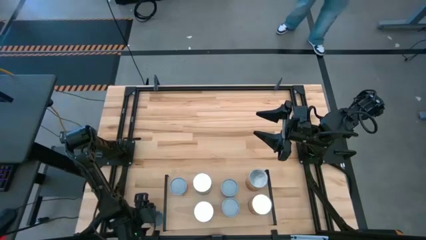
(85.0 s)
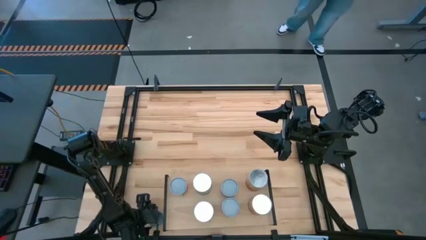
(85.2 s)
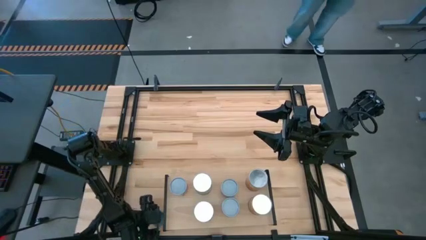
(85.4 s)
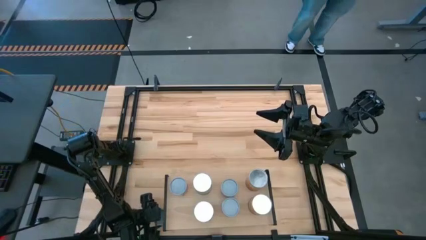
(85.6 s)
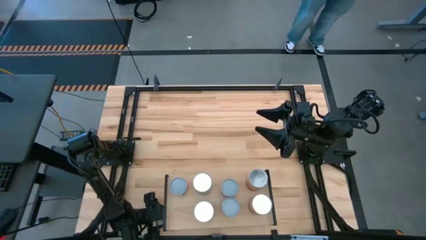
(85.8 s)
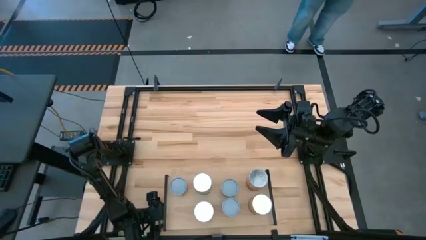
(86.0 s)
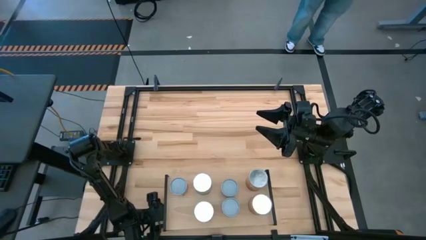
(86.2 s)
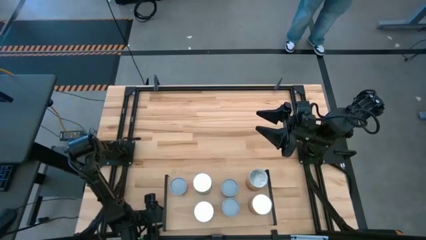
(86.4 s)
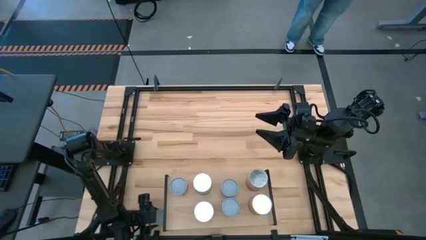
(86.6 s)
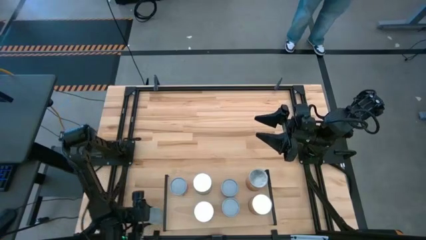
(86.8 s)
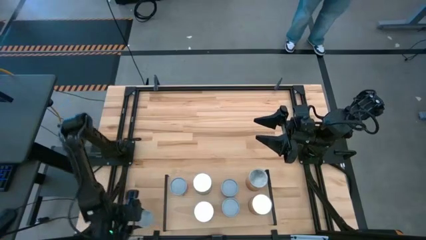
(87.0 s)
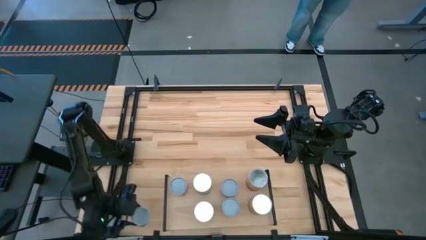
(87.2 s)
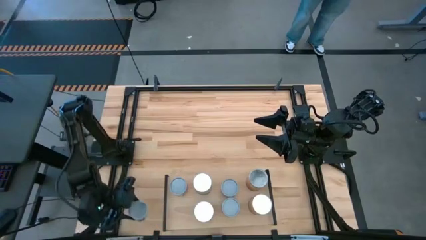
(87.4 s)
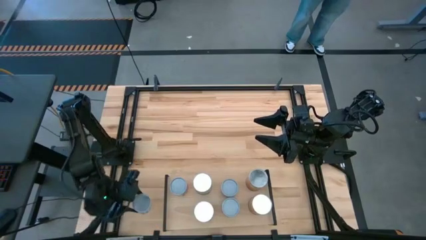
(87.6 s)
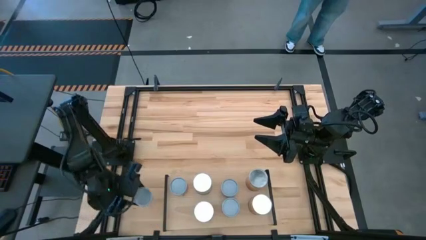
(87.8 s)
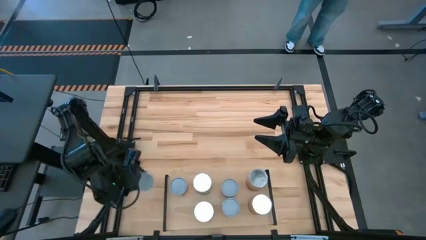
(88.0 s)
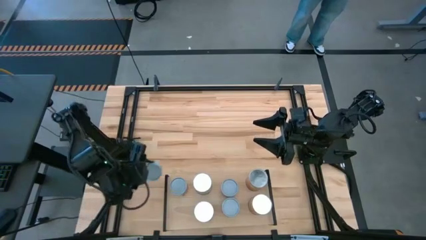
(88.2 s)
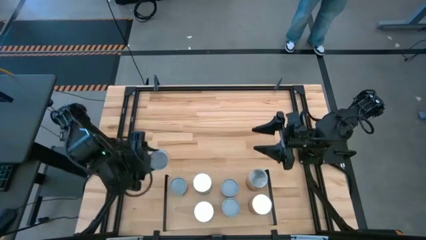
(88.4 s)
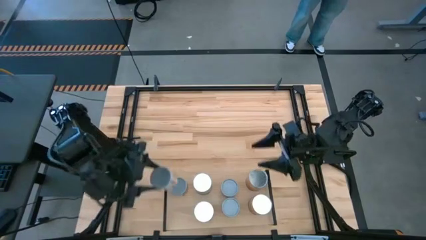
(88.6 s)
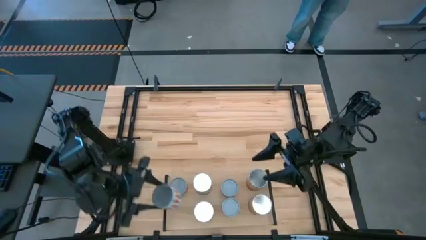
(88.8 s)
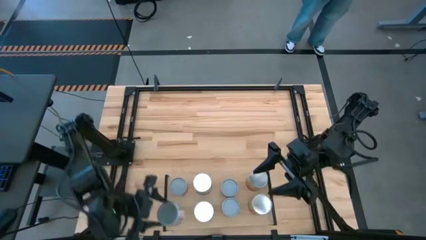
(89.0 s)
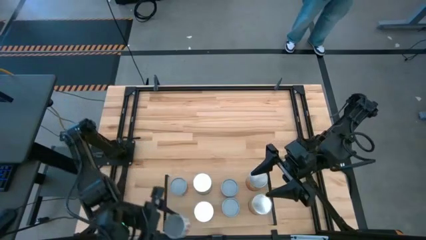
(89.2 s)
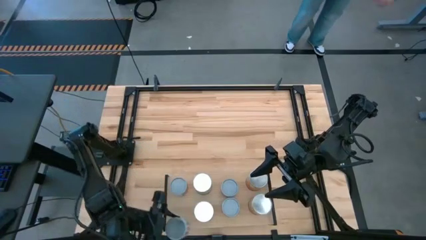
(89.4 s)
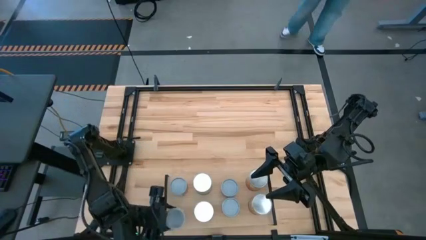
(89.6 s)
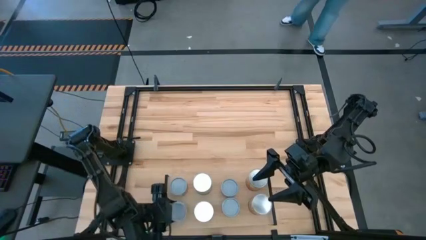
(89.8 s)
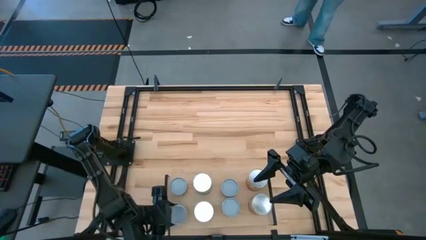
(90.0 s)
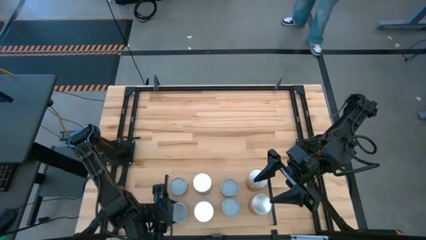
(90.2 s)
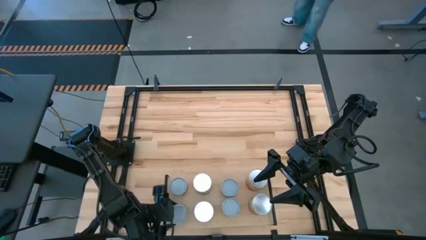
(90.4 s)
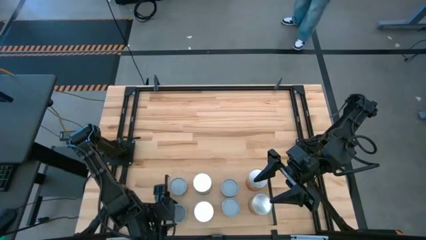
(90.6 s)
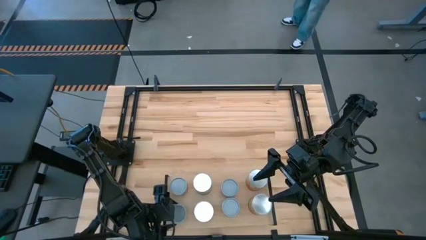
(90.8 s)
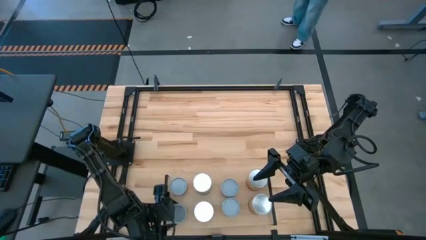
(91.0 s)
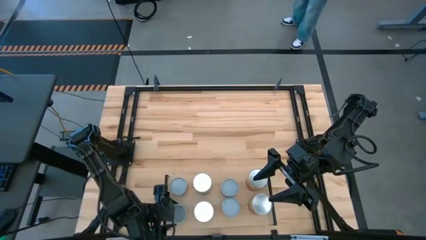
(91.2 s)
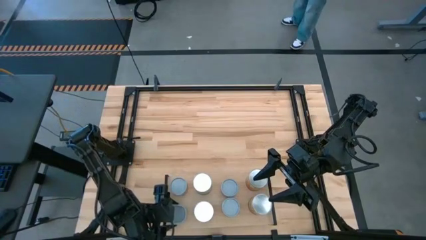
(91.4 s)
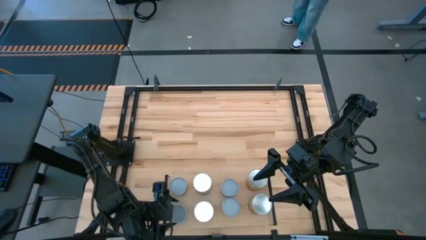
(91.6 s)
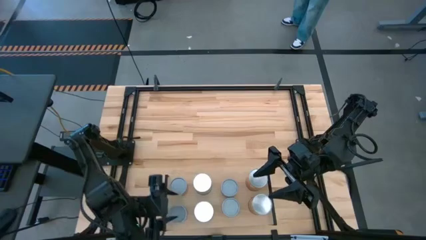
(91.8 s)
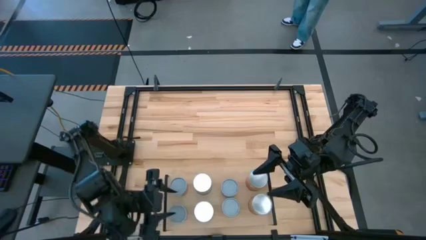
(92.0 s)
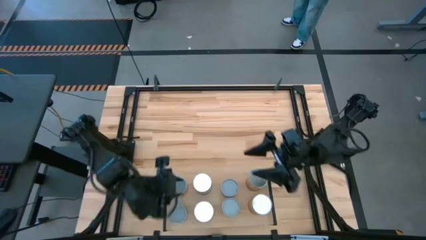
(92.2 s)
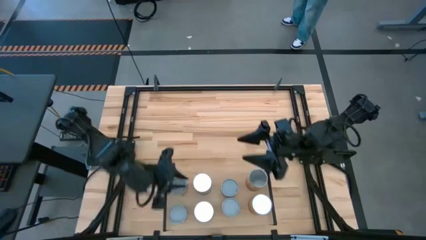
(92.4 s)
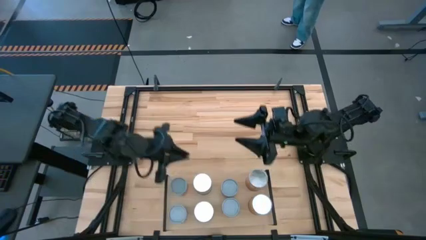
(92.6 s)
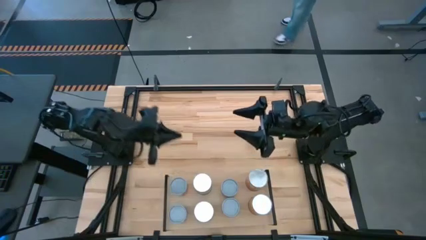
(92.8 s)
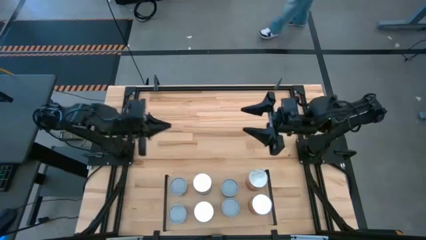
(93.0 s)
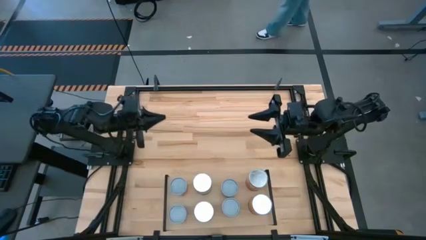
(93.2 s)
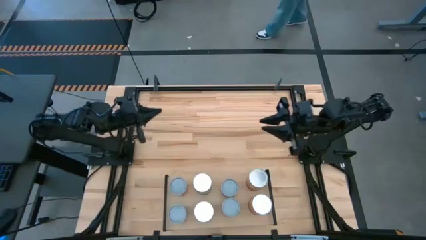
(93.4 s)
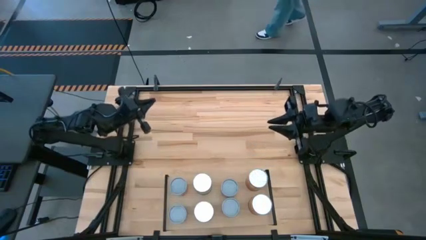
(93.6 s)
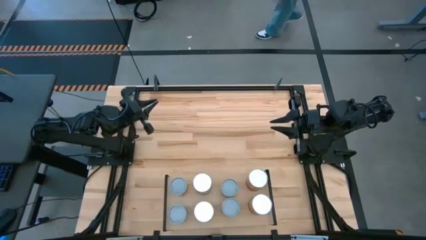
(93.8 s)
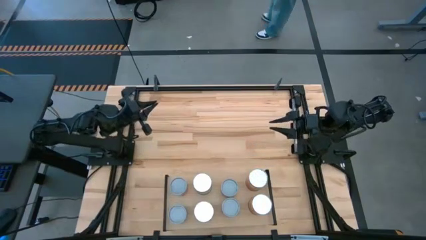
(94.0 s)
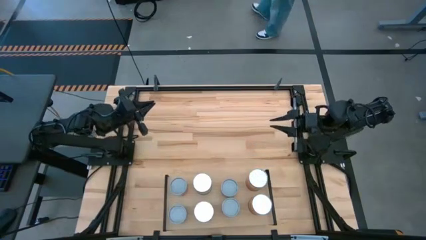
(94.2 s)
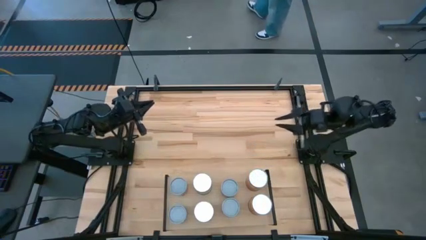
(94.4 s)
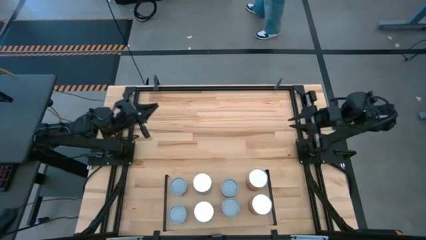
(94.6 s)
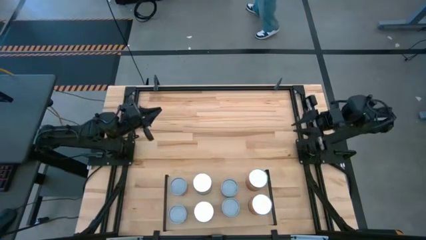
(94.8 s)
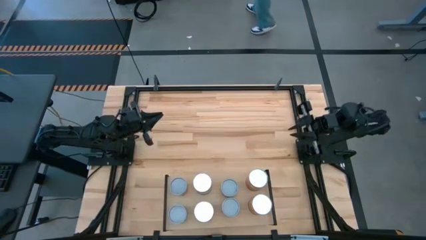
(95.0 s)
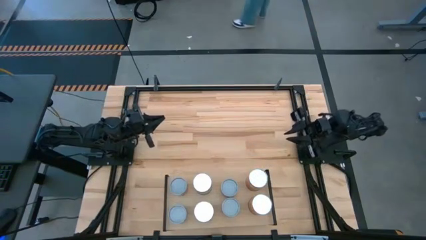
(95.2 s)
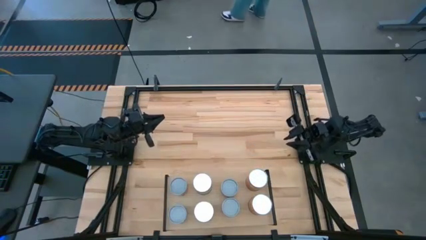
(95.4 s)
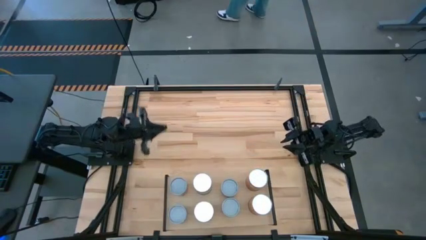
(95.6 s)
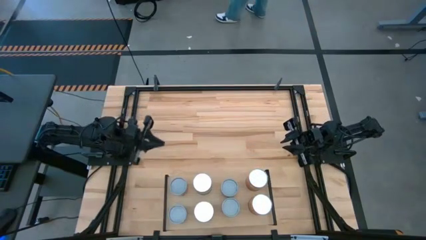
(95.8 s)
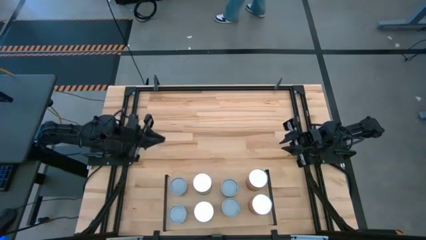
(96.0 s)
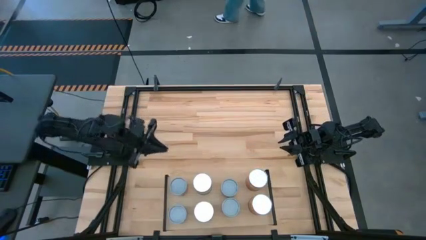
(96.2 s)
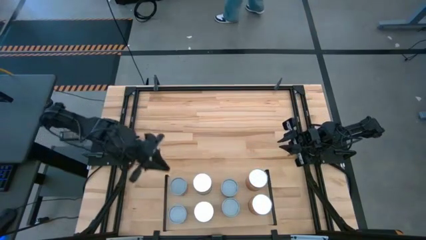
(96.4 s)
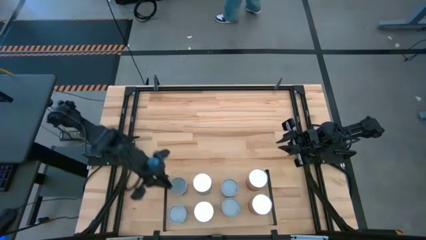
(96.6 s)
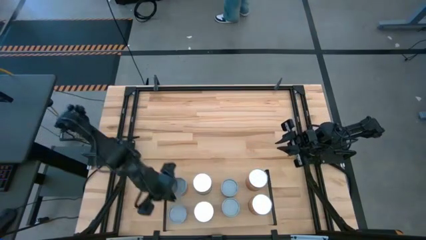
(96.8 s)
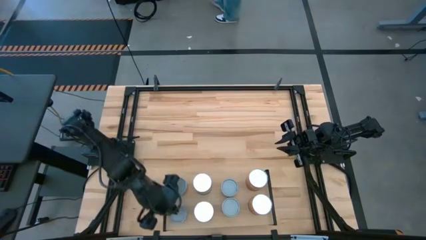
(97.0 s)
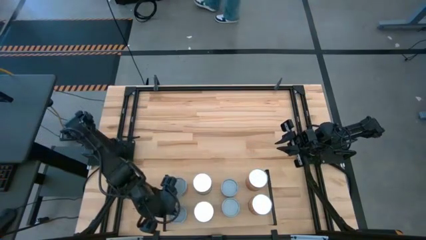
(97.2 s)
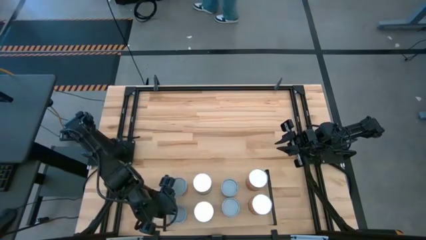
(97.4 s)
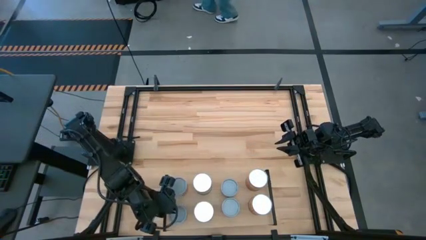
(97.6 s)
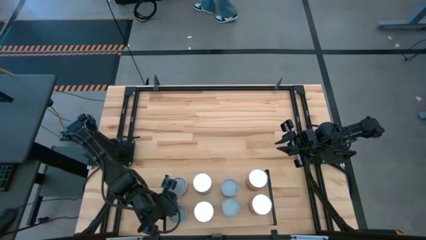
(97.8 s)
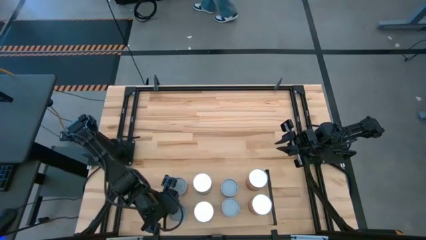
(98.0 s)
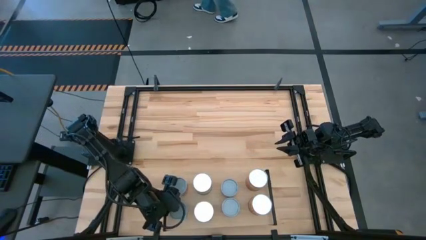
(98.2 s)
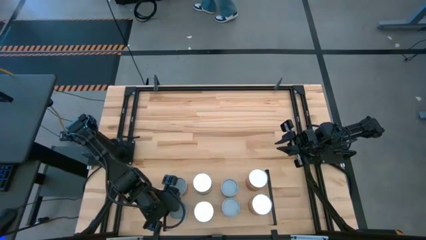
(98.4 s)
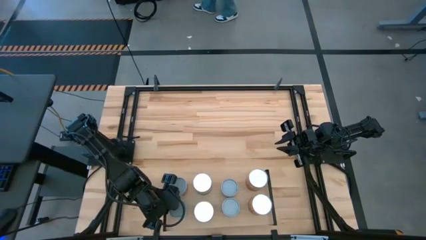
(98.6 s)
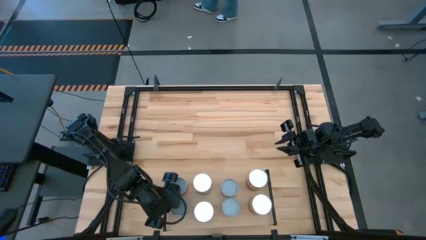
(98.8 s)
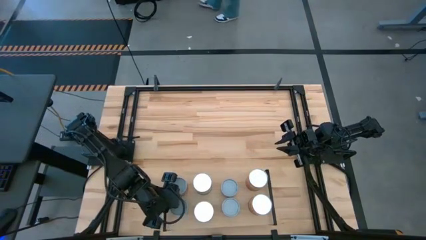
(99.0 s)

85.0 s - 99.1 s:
Task: Pick and place cans onto a shelf
Put the small canned carrots on the shelf
